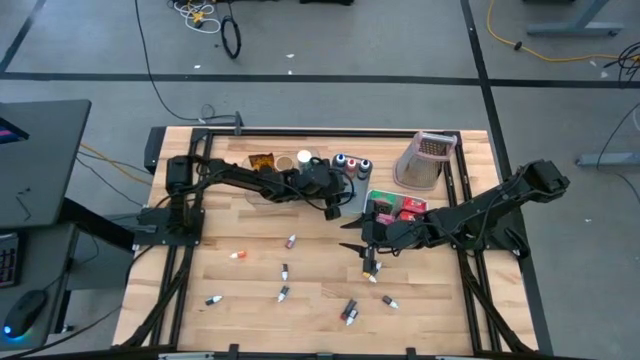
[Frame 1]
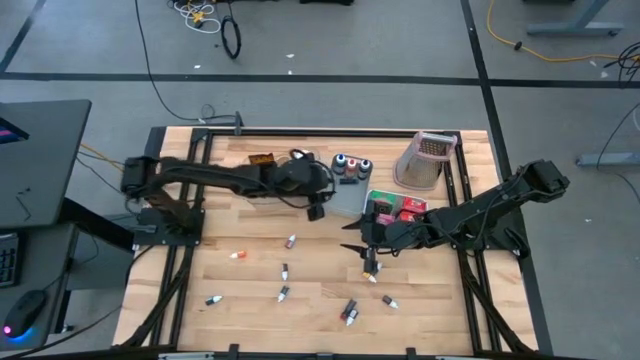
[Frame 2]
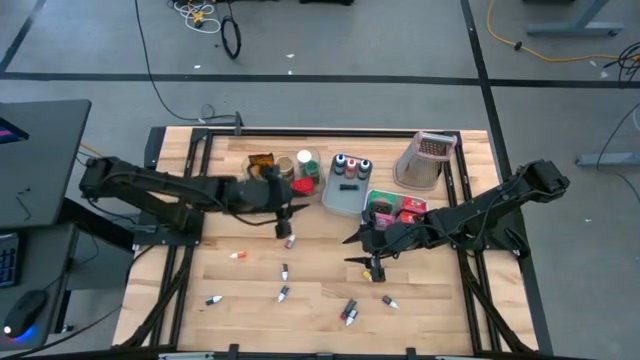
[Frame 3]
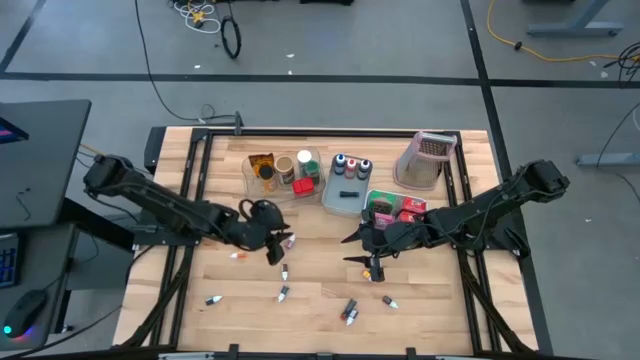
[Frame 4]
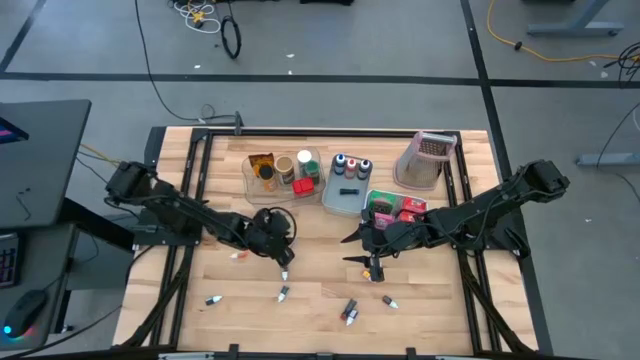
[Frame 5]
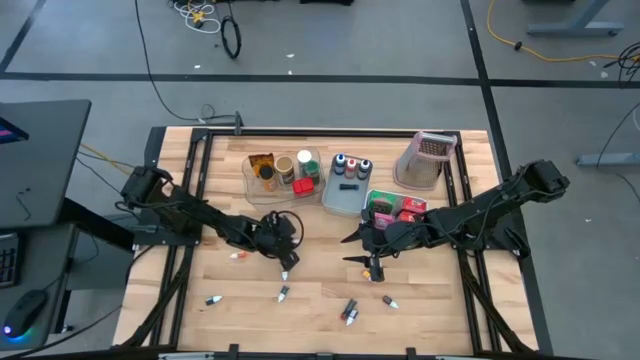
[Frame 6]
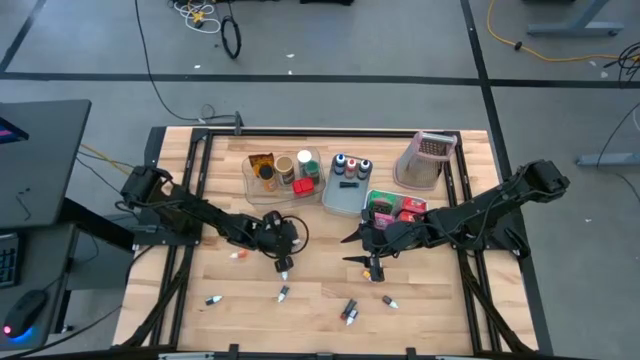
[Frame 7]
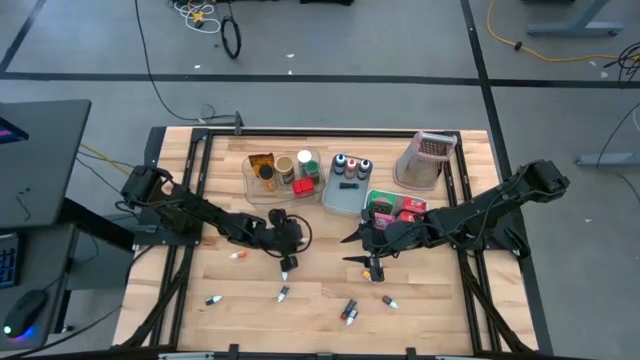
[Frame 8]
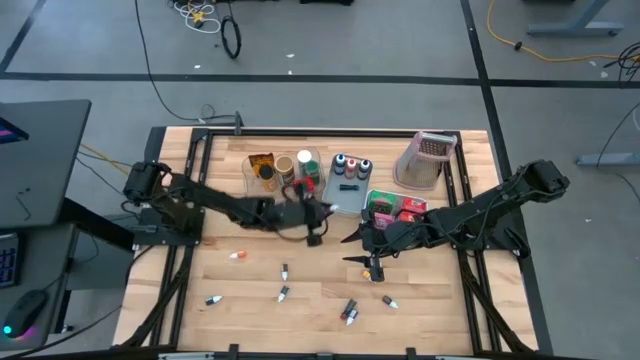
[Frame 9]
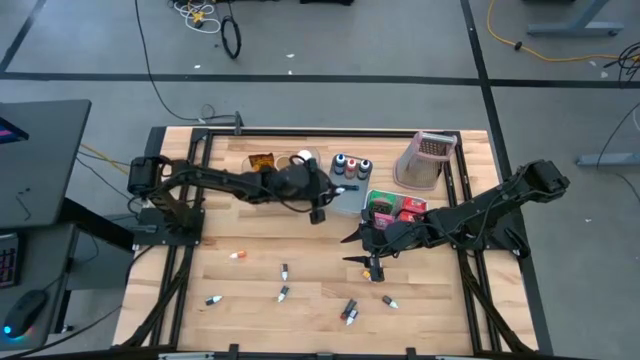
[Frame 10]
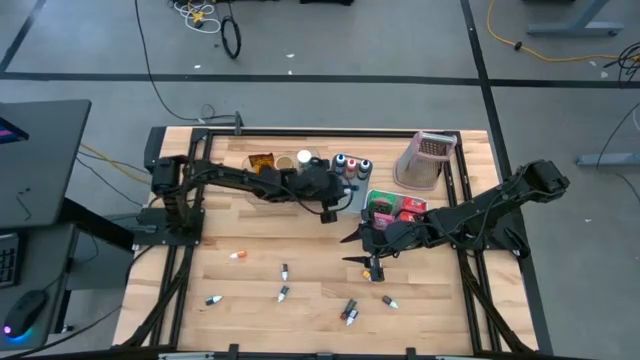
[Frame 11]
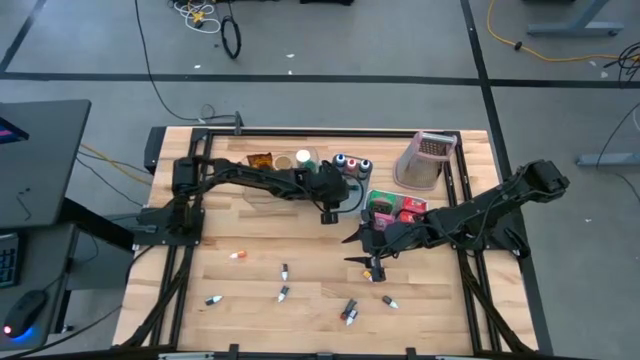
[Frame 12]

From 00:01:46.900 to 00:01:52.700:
Task: Pick & Place Kitchen Items
Put the small pink food coloring into the gray bin

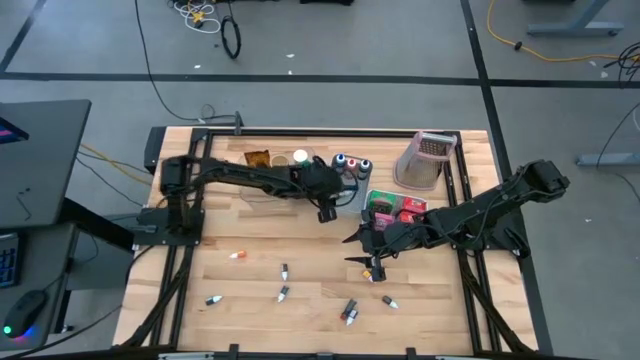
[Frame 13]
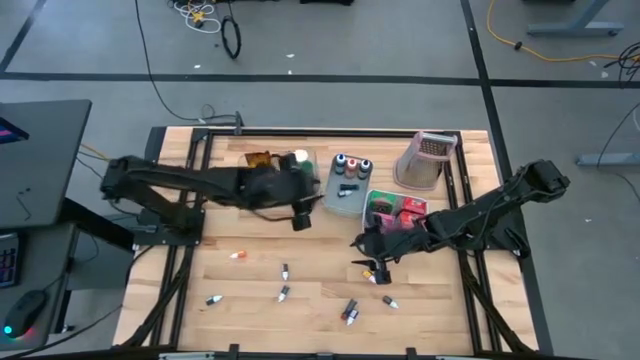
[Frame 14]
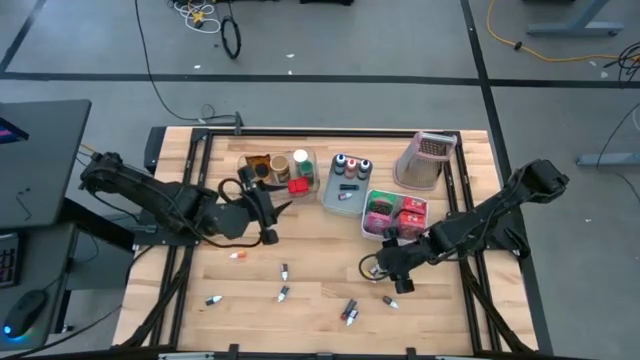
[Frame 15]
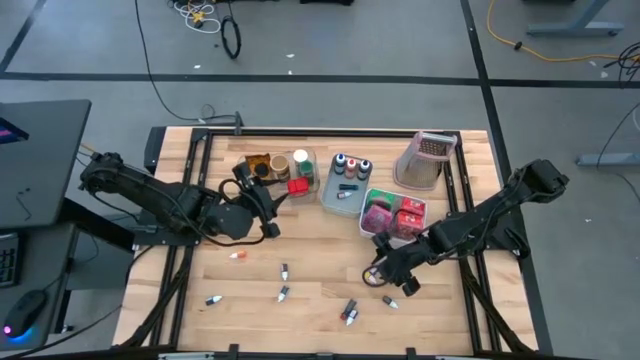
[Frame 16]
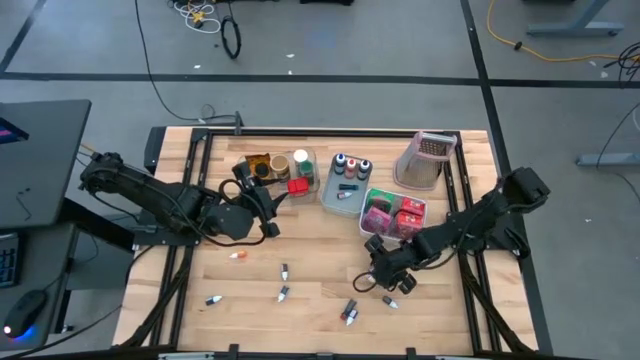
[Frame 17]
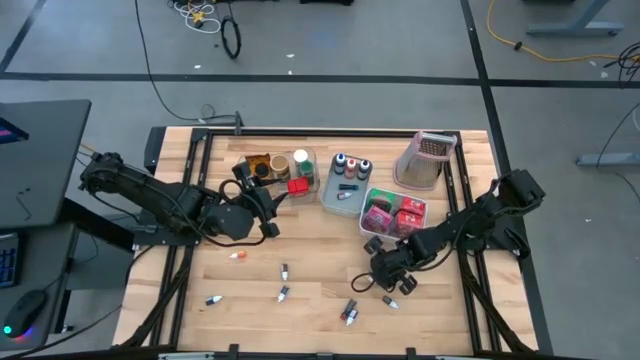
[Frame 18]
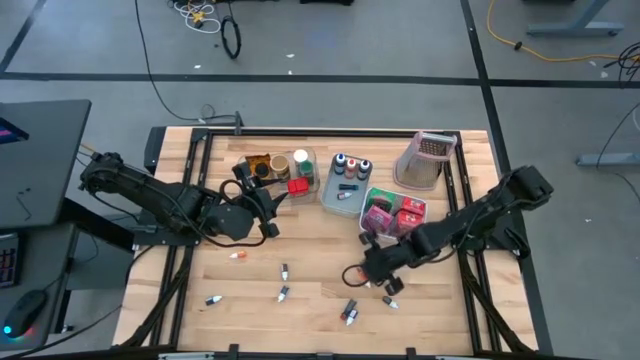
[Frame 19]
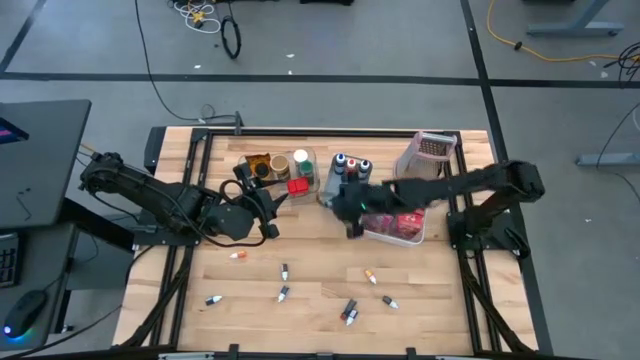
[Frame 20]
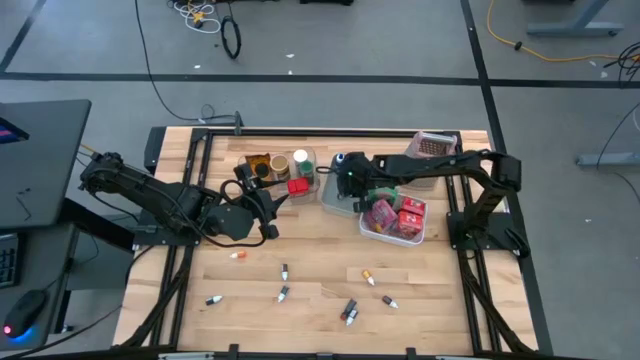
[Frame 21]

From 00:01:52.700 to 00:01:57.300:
Put the right small black food coloring into the gray bin

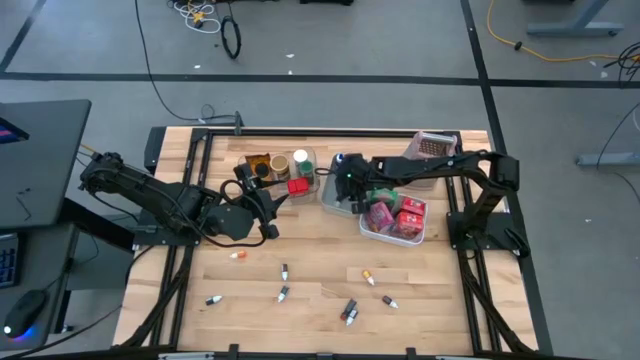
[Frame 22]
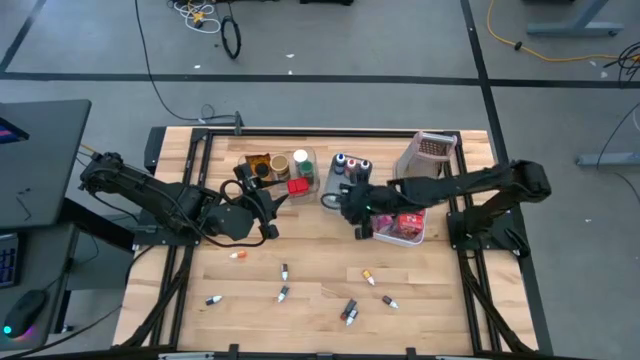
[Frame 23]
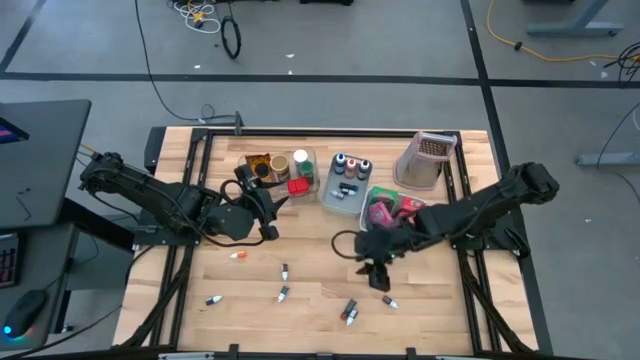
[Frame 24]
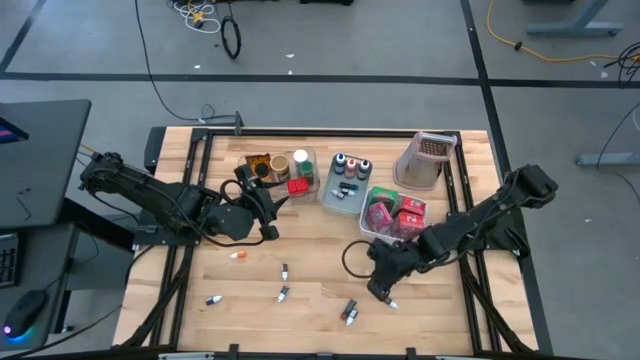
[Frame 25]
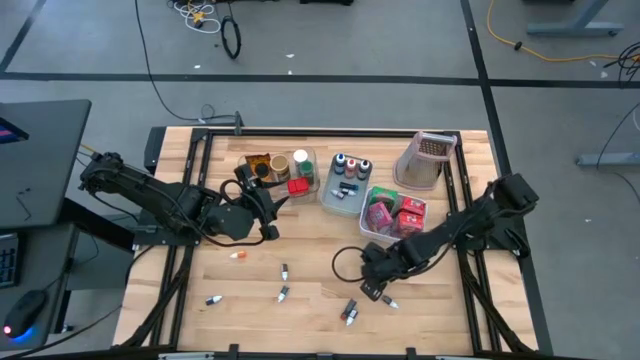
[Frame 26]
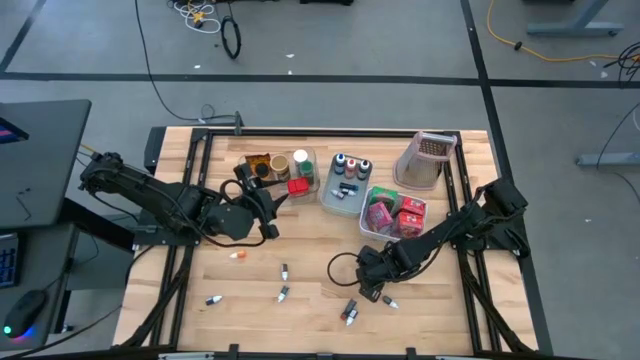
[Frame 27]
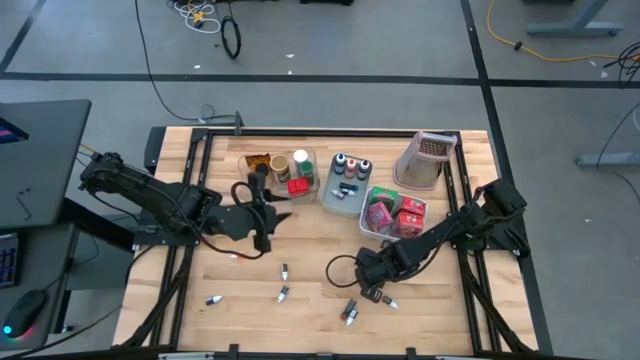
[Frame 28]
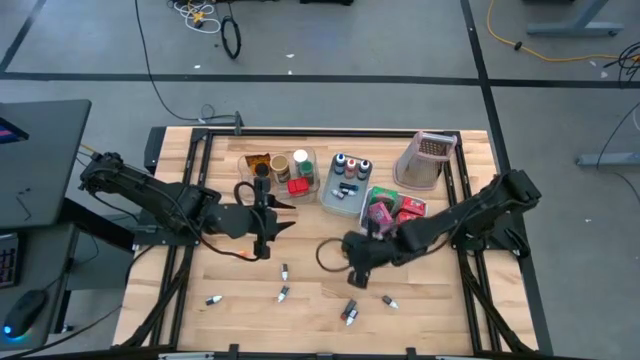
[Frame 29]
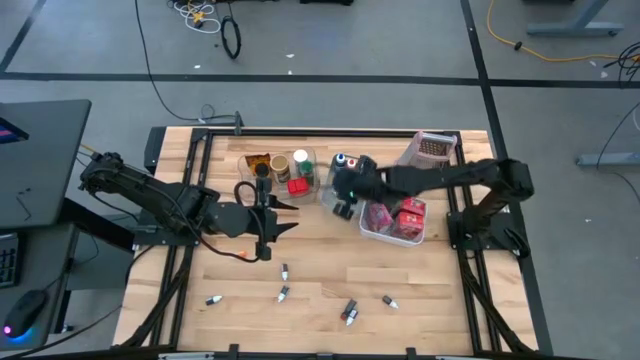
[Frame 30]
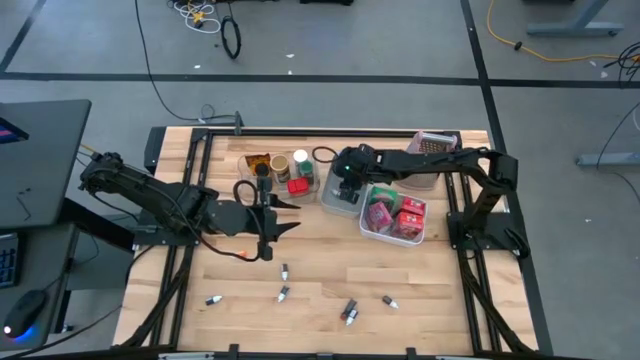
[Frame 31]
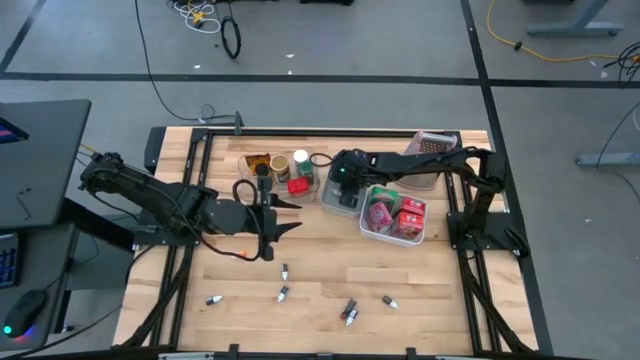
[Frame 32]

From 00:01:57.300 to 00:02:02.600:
Put the right small yellow food coloring into the gray bin

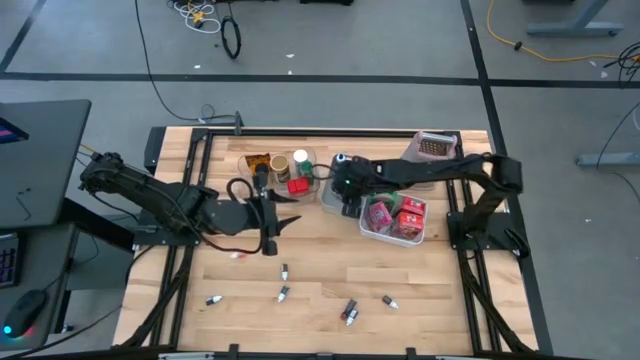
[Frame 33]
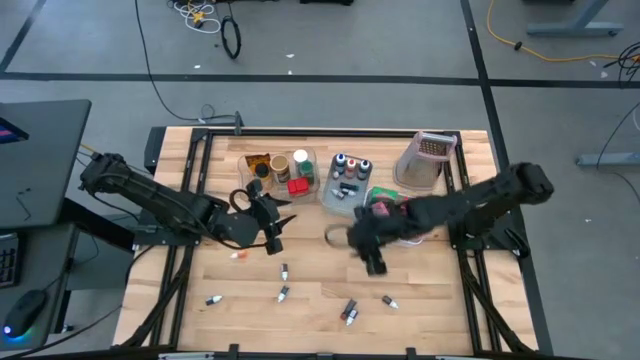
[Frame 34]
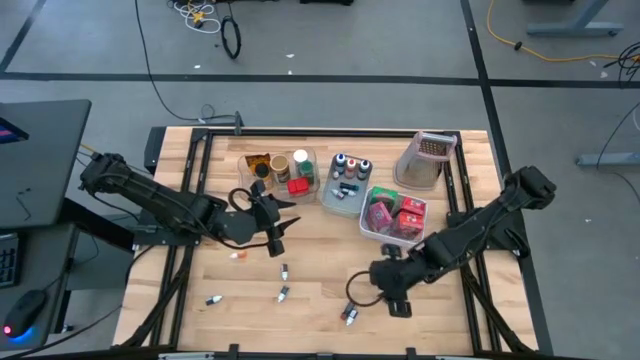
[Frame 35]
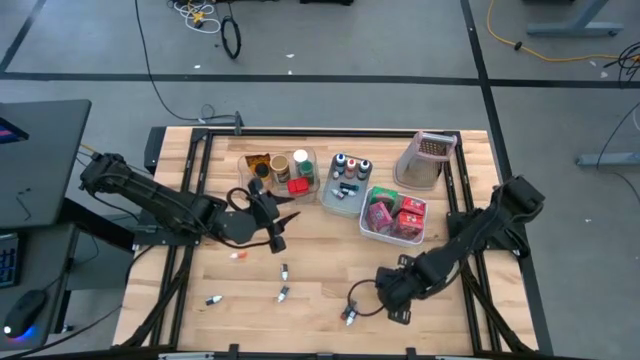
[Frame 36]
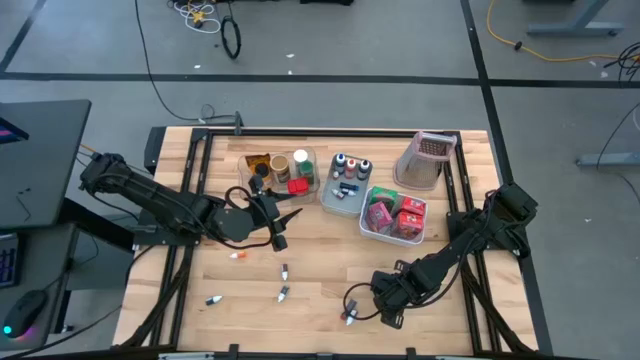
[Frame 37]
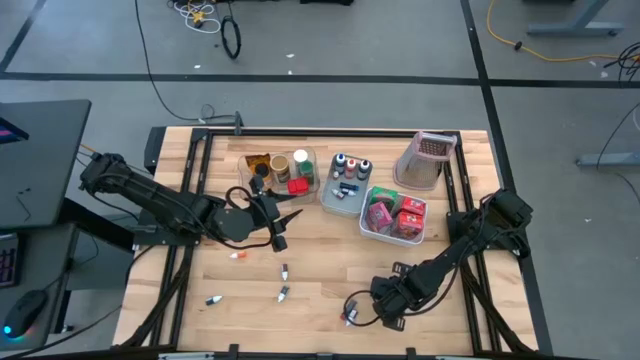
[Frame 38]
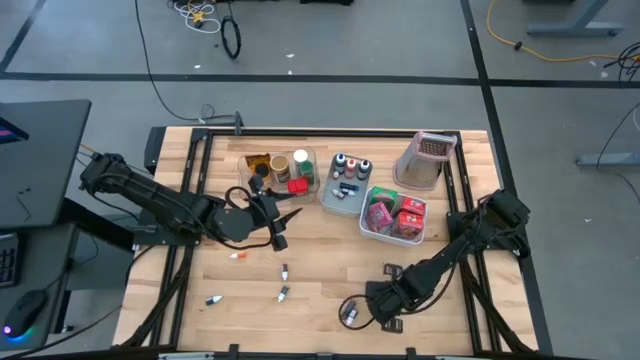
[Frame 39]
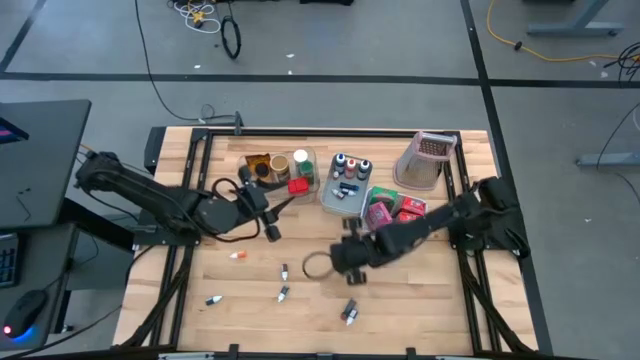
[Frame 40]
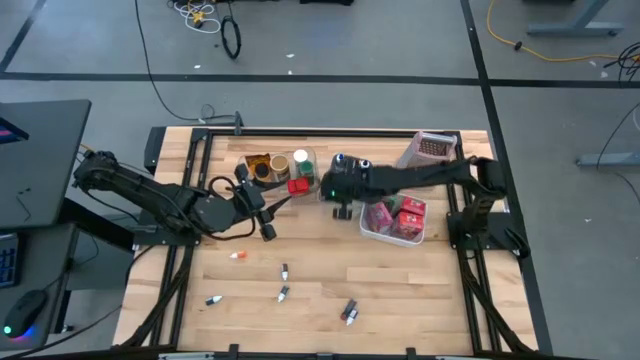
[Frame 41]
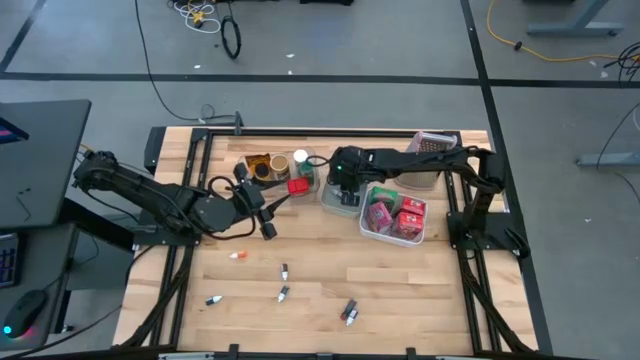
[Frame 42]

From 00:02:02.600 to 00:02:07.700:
Put the small red food coloring into the gray bin
